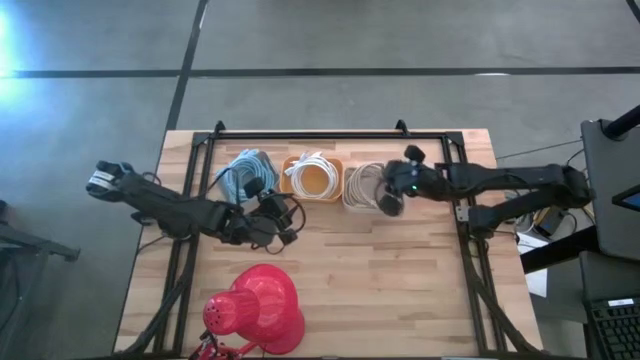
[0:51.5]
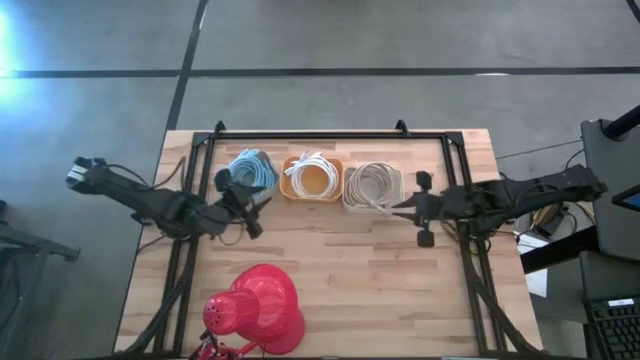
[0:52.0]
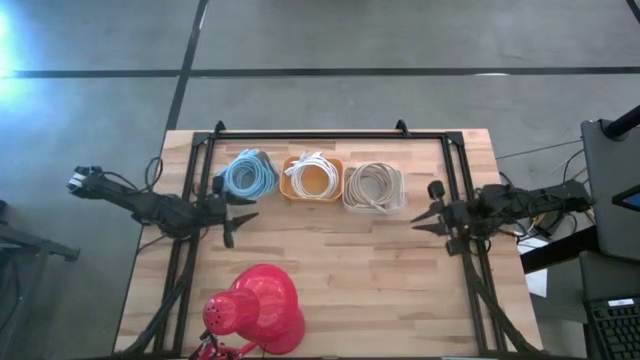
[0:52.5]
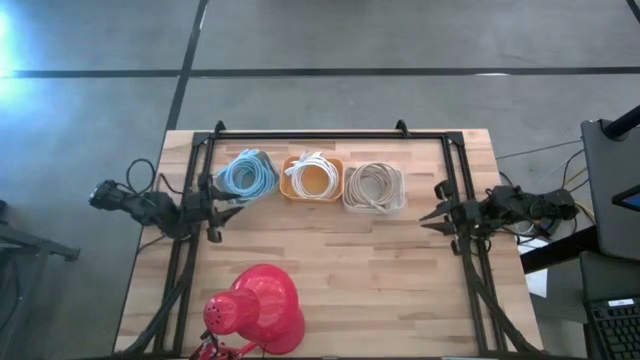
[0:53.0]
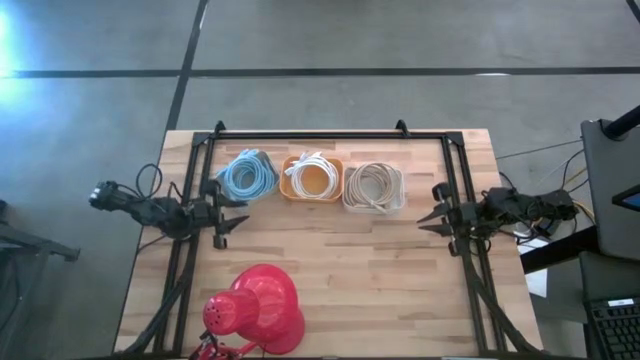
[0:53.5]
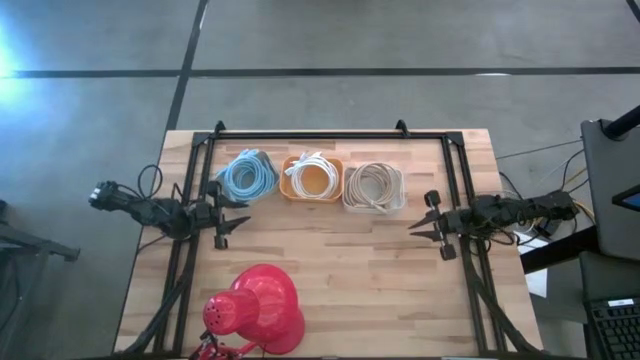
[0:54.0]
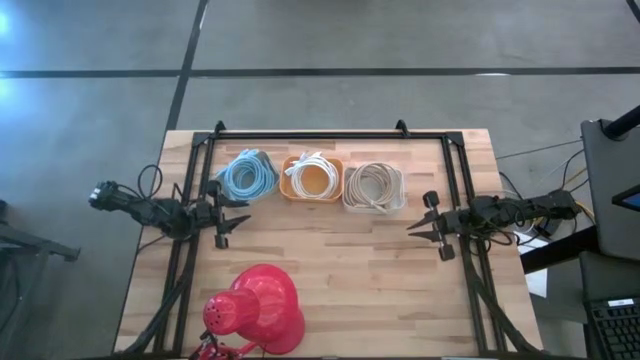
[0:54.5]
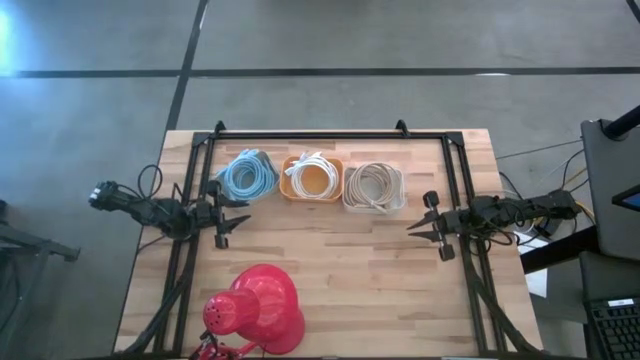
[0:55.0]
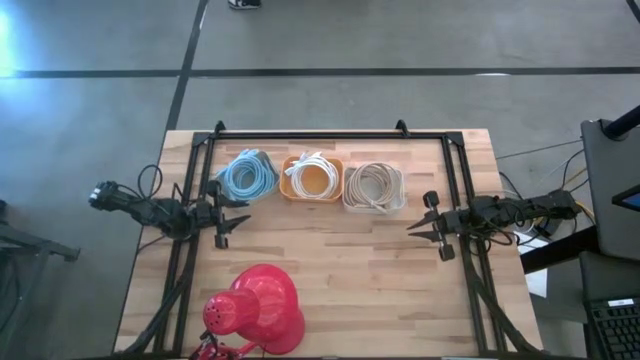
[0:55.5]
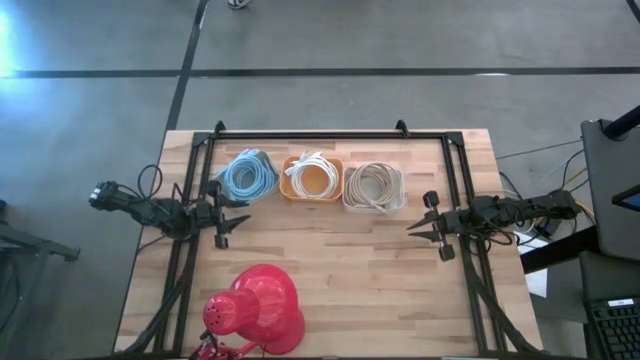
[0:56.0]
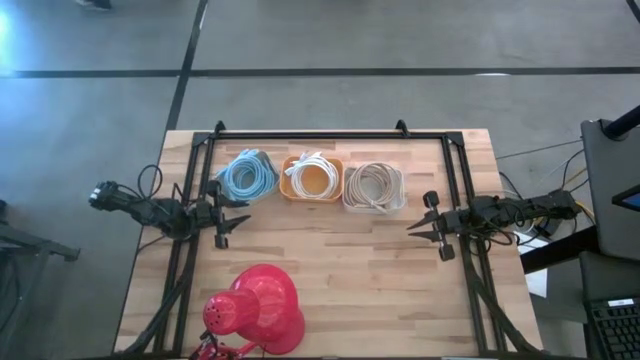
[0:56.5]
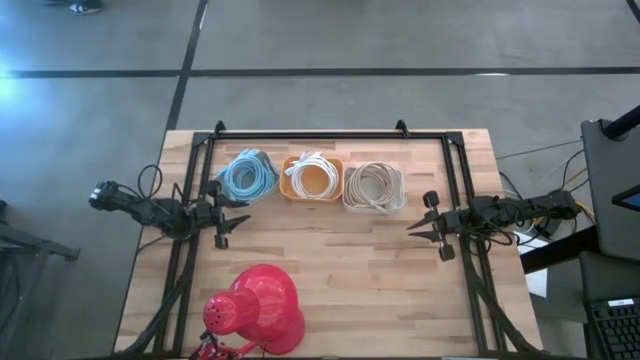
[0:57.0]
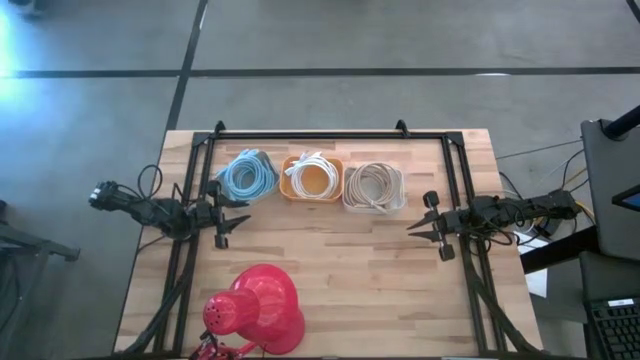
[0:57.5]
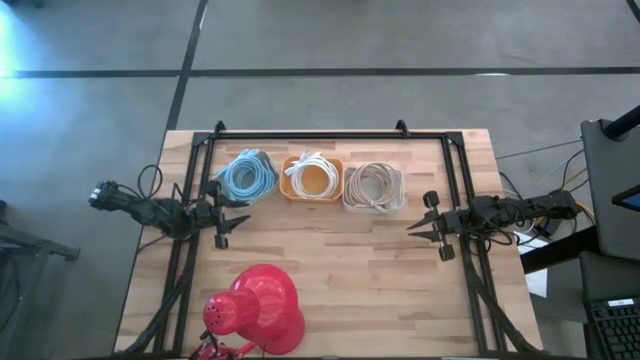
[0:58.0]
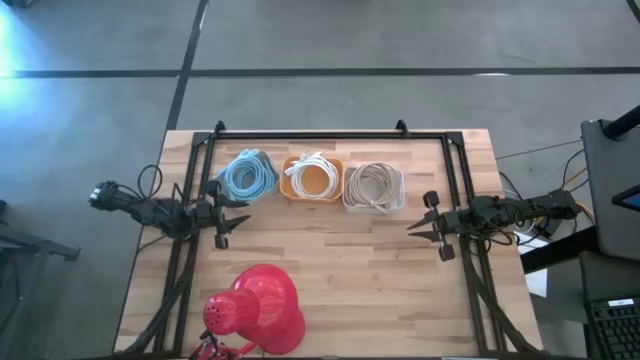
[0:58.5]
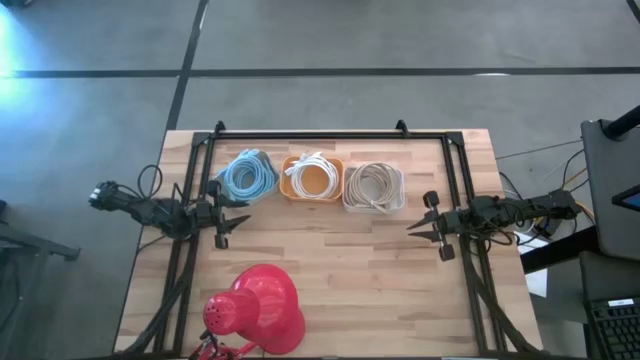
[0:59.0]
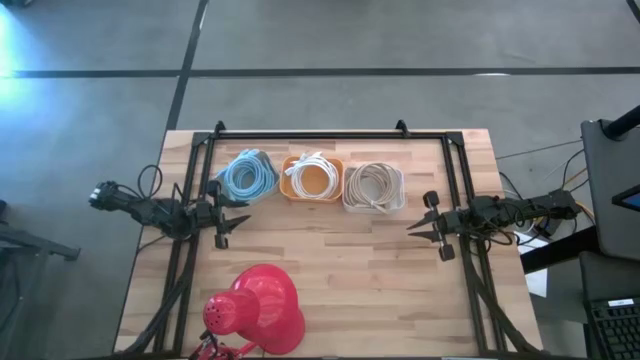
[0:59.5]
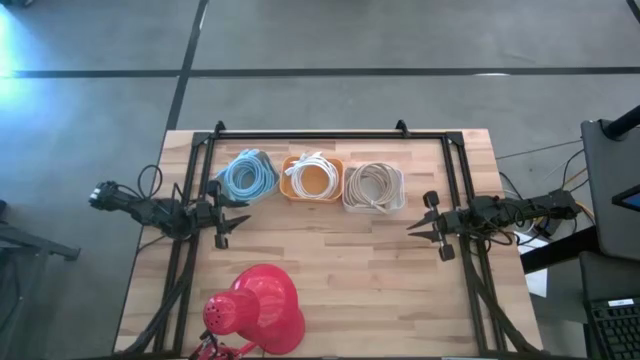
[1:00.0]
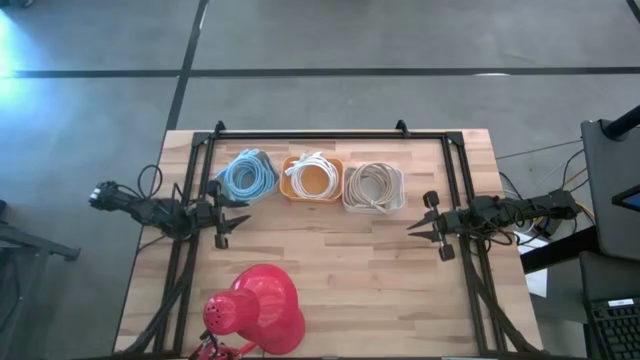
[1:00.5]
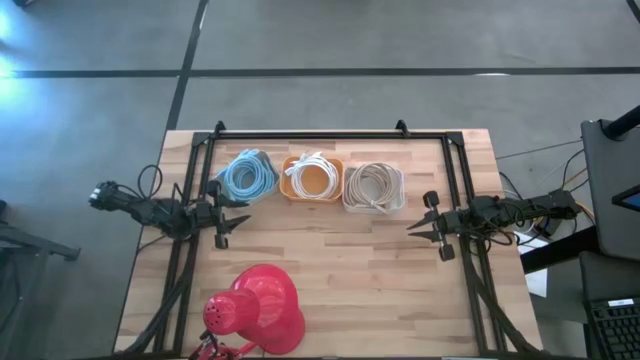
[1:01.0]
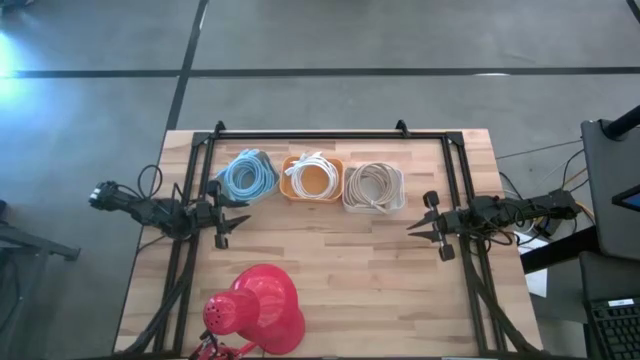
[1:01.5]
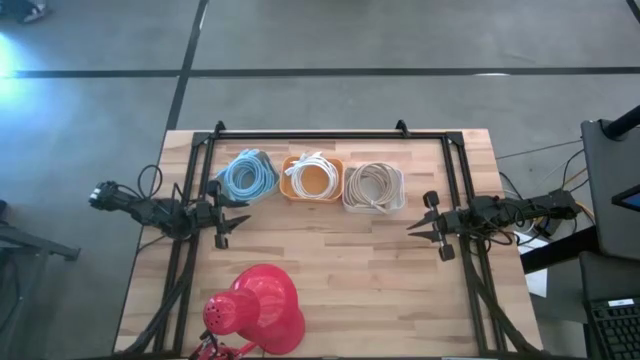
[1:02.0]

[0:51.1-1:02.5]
Task: Sort HDMI cables
Return to Home Position

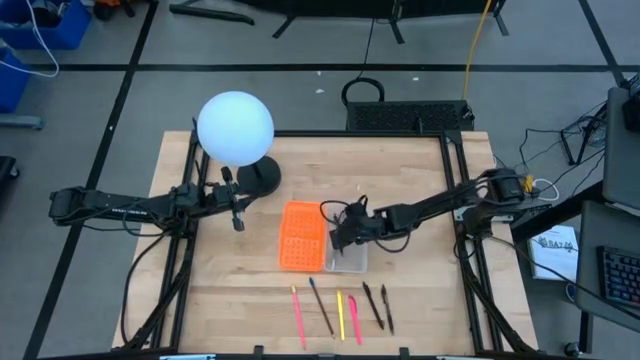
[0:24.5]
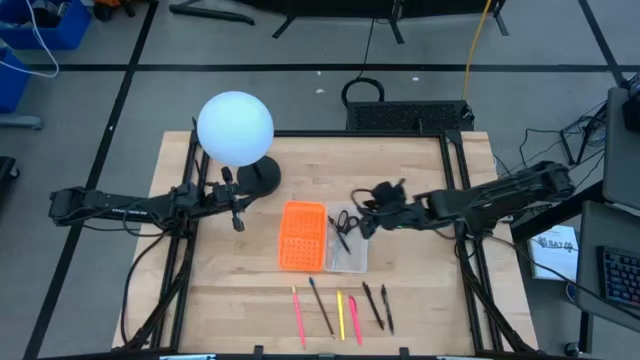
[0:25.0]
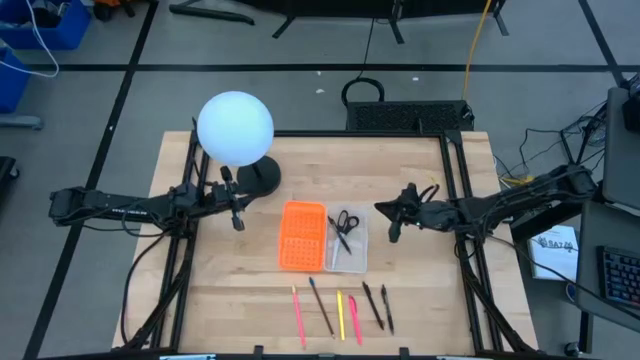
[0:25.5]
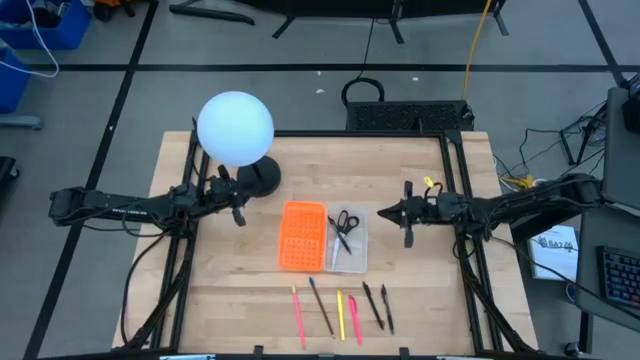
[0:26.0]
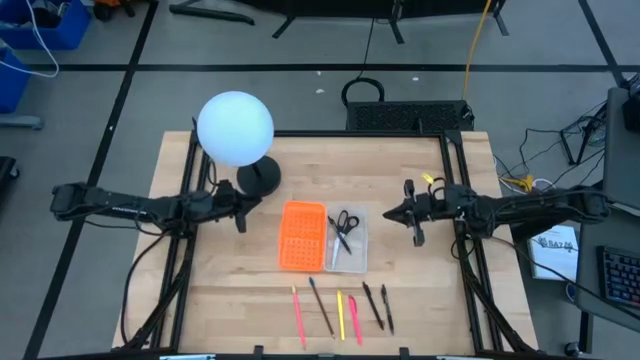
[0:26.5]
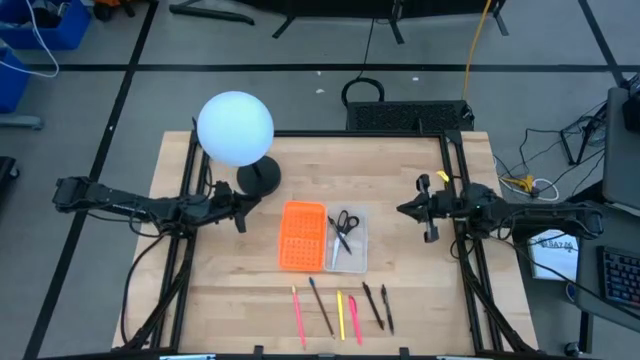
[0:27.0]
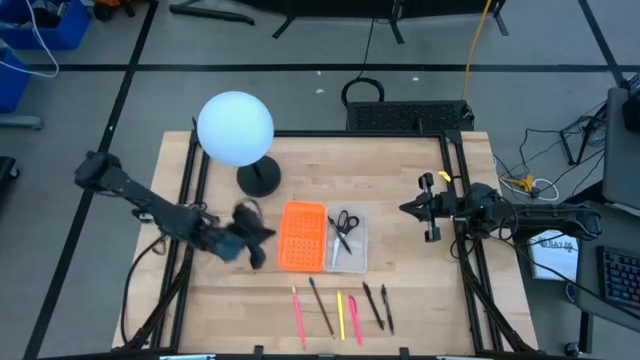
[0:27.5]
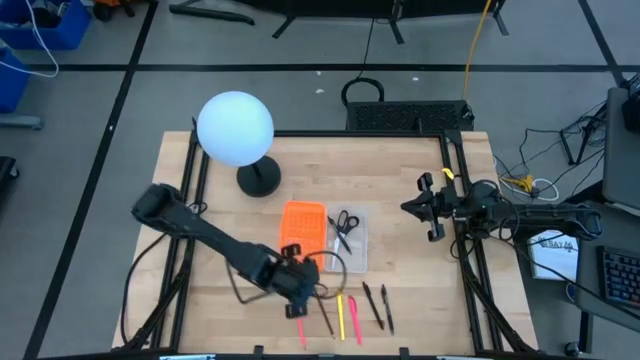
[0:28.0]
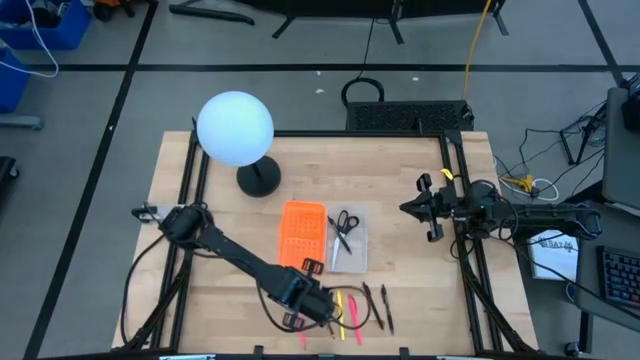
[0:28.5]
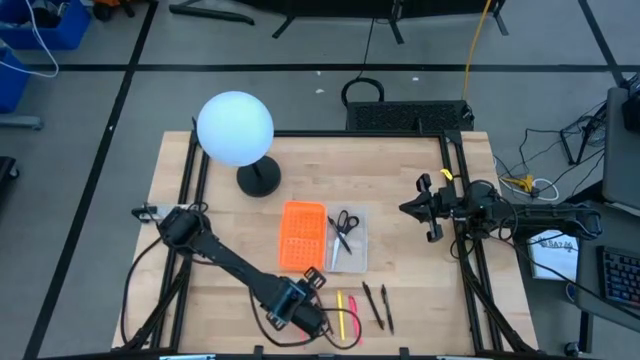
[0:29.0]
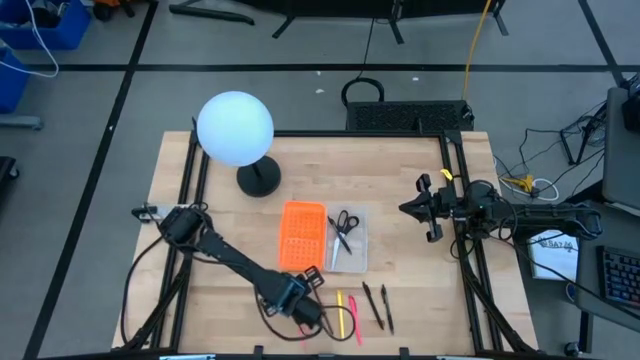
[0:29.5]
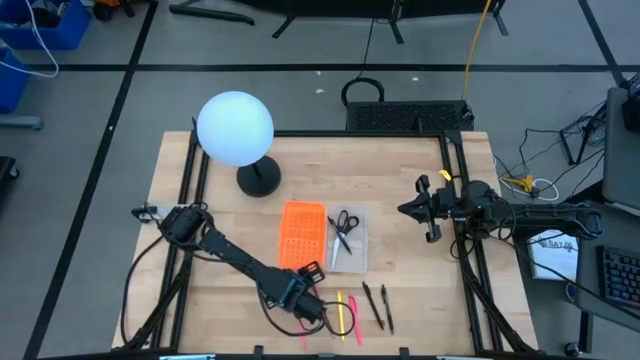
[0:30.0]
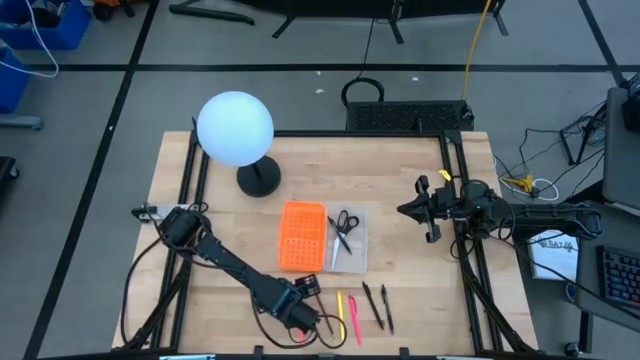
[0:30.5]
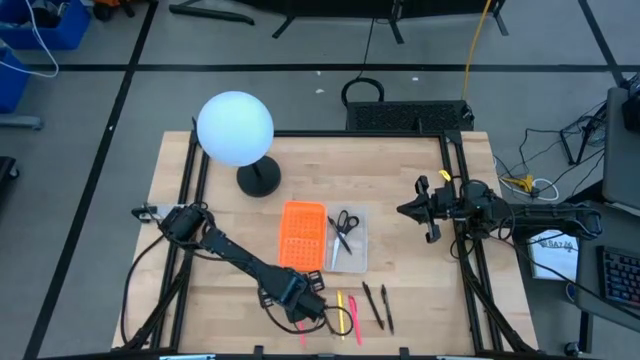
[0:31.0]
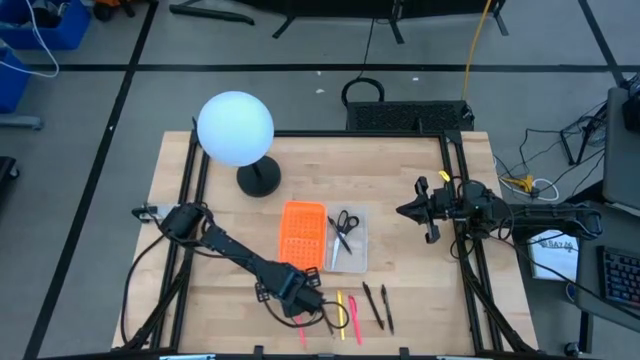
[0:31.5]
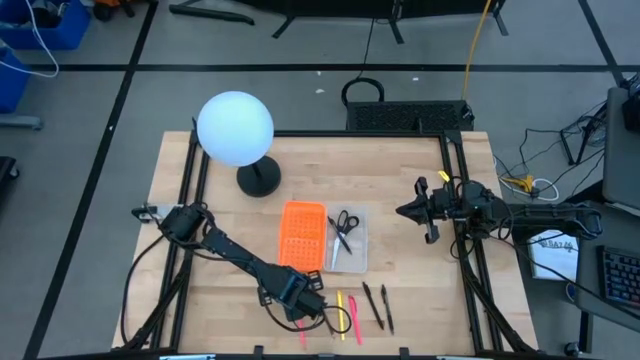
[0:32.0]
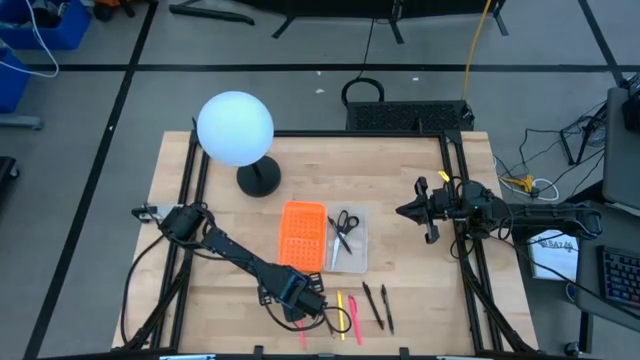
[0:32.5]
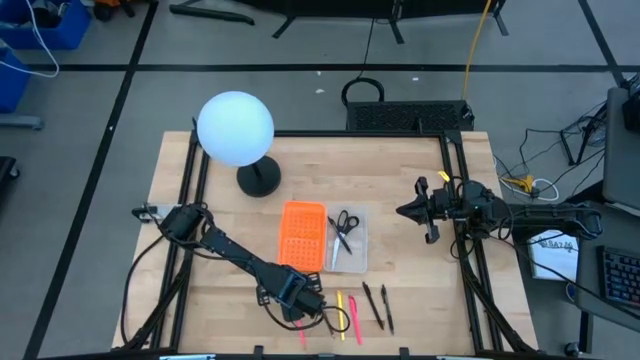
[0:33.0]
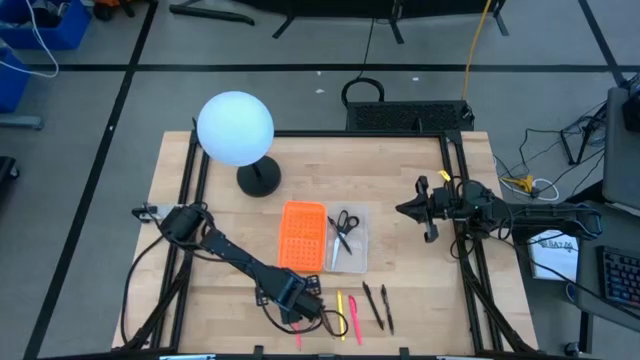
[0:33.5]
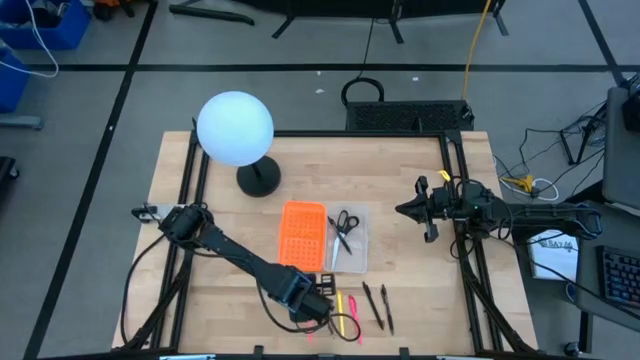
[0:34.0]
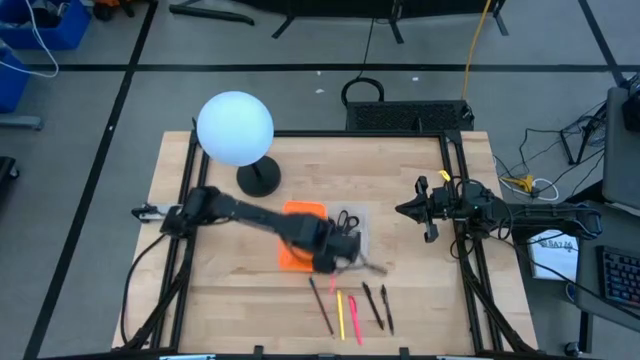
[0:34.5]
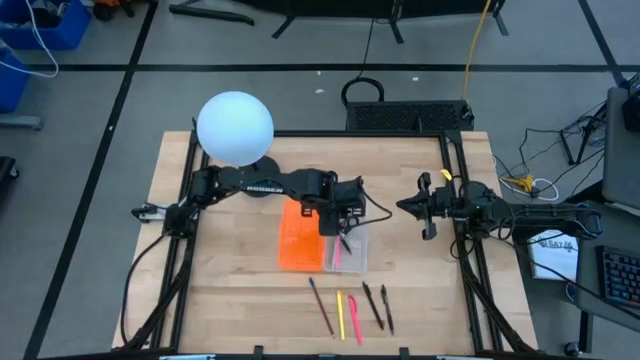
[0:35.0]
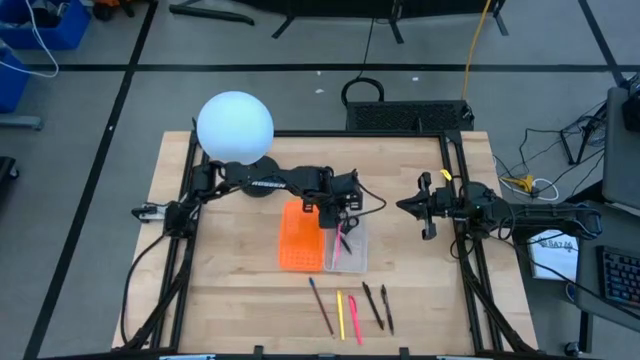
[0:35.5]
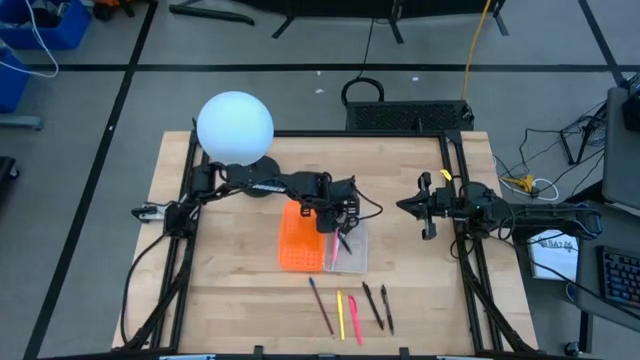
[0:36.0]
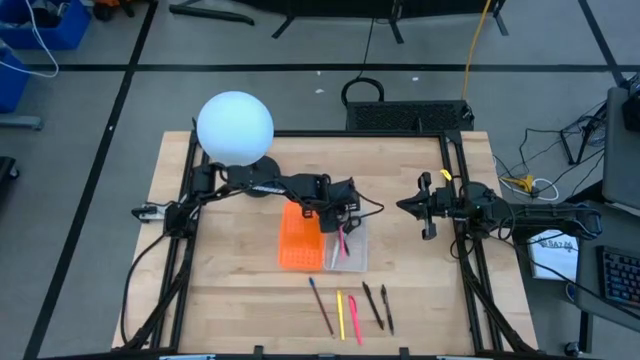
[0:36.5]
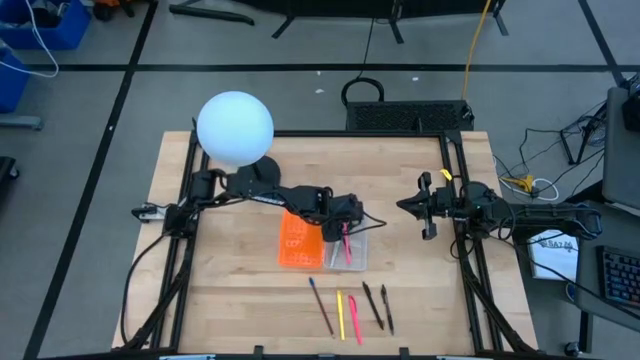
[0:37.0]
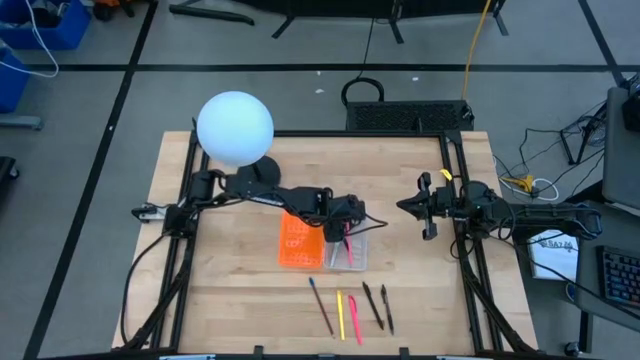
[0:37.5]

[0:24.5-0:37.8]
Task: Pick & place school supplies into a supply box
Put the pink pencil into the orange supply box
